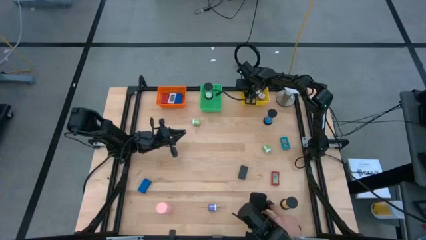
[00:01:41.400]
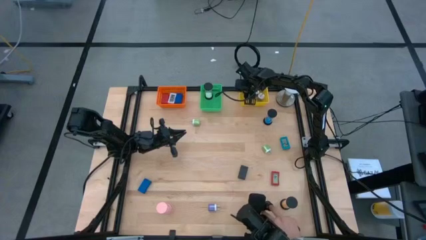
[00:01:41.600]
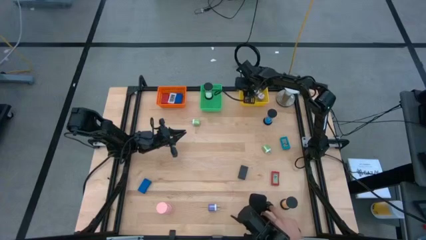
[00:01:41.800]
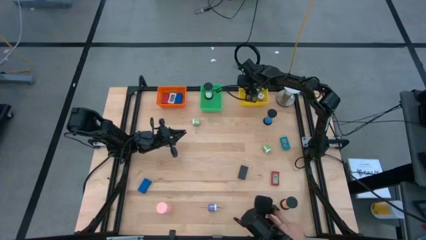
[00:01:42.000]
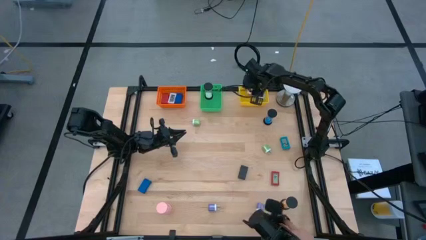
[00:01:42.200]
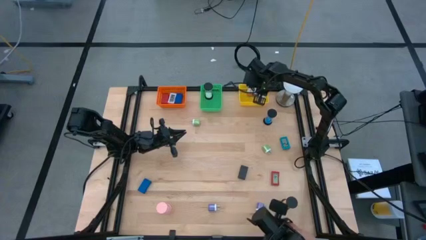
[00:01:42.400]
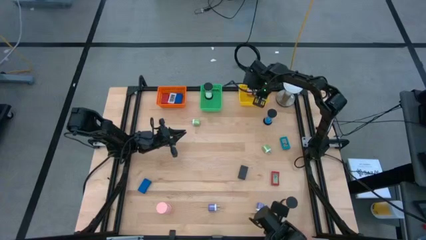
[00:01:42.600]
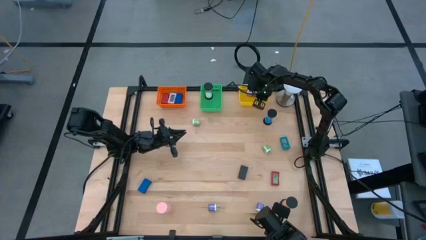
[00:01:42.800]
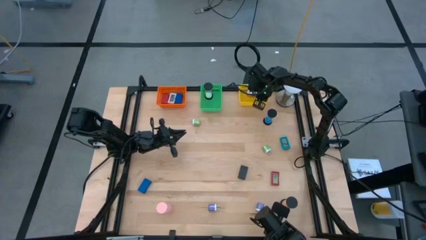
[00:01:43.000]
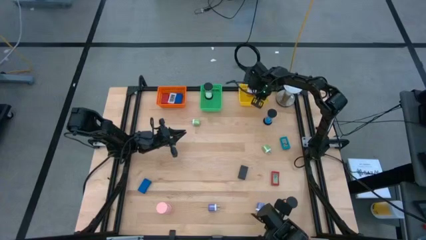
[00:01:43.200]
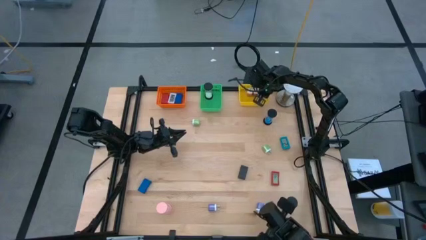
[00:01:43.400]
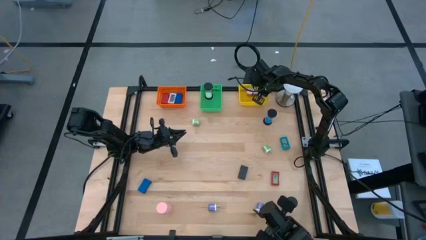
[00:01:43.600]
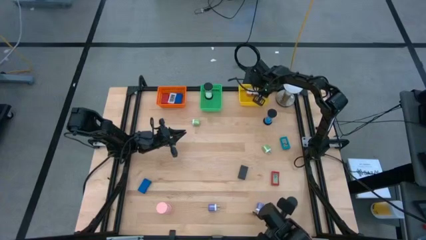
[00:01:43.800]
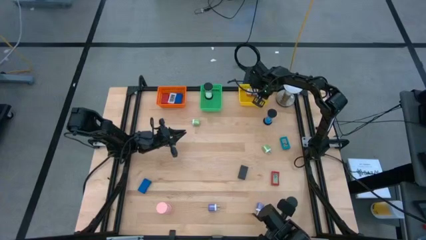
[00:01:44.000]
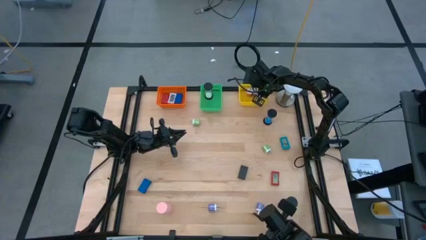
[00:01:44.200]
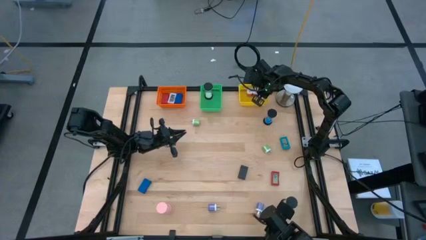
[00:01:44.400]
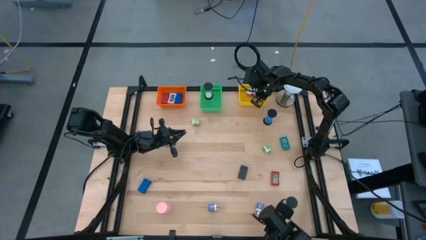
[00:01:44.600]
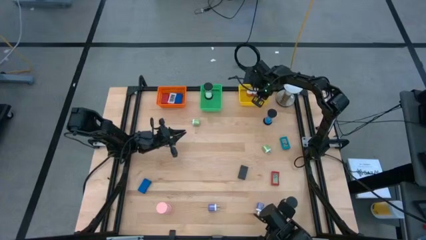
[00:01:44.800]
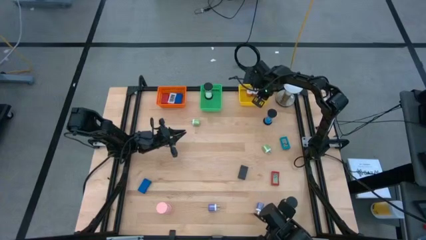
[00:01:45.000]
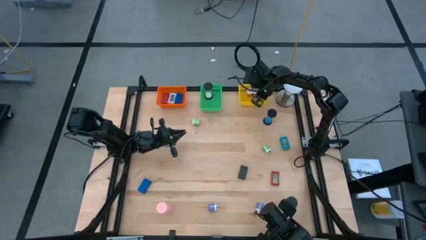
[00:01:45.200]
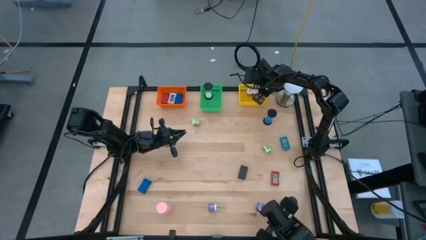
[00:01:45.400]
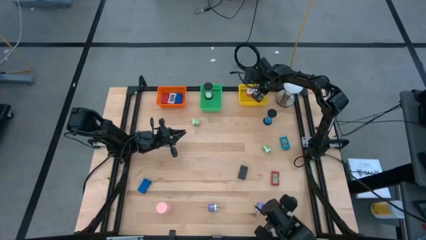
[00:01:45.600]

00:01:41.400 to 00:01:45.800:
Task: Pick & Place Office items
Adjust the blue charger adapter in the yellow bin

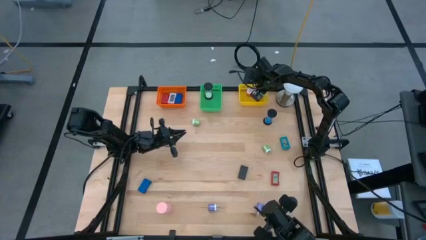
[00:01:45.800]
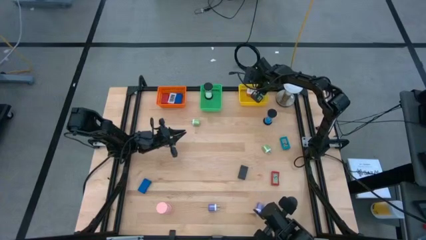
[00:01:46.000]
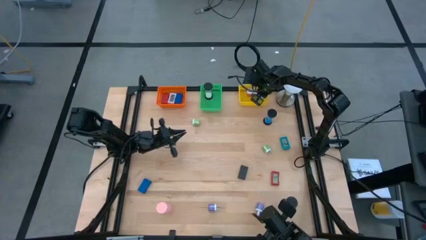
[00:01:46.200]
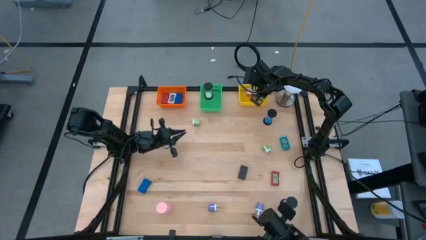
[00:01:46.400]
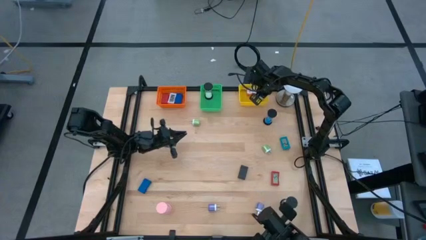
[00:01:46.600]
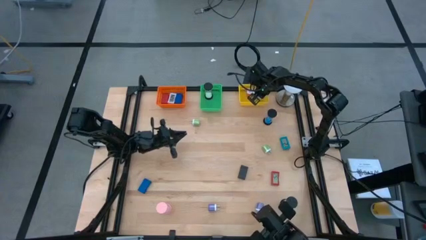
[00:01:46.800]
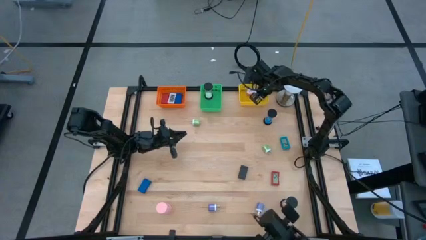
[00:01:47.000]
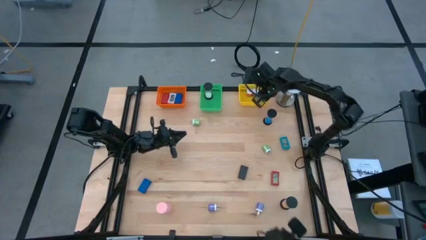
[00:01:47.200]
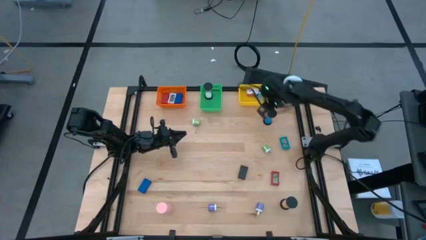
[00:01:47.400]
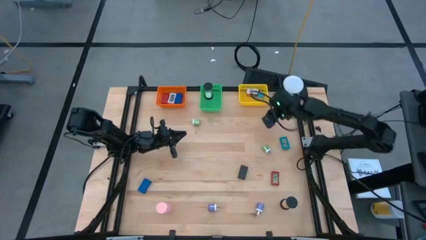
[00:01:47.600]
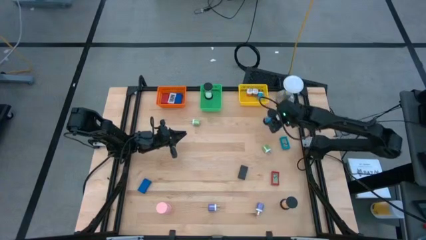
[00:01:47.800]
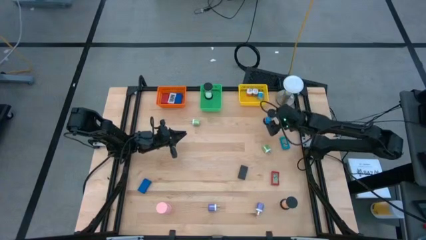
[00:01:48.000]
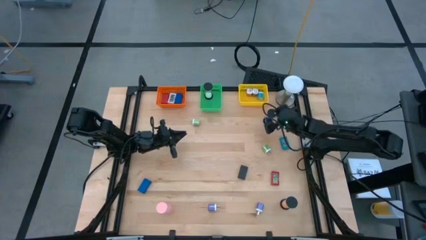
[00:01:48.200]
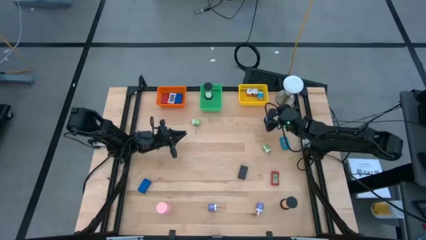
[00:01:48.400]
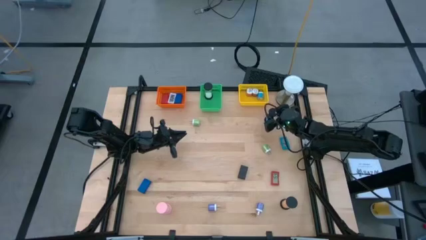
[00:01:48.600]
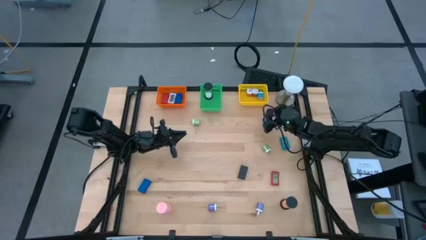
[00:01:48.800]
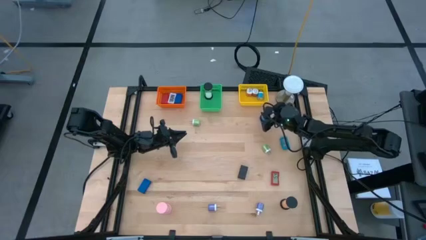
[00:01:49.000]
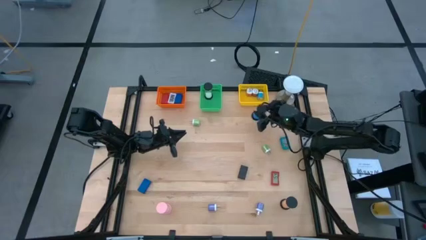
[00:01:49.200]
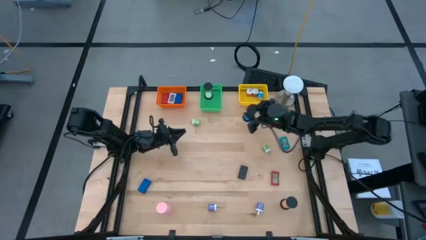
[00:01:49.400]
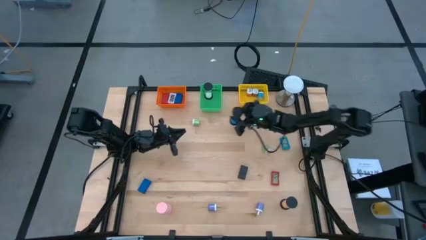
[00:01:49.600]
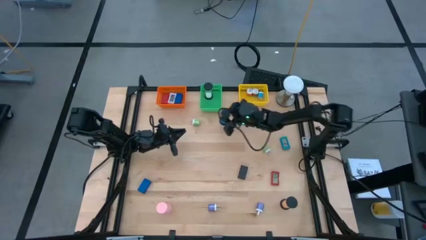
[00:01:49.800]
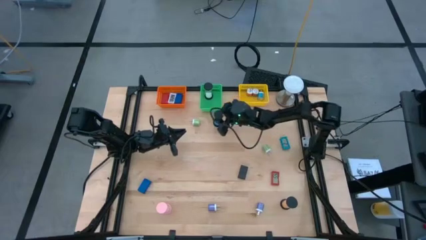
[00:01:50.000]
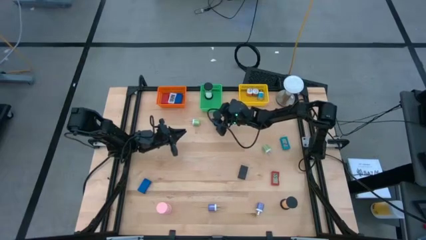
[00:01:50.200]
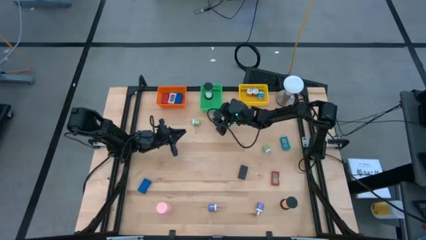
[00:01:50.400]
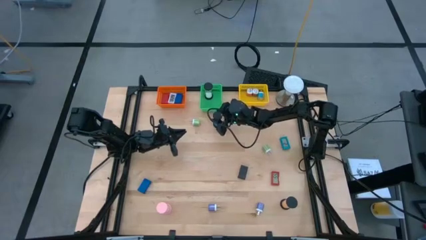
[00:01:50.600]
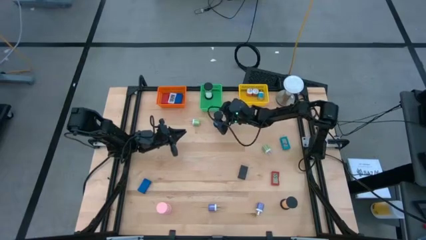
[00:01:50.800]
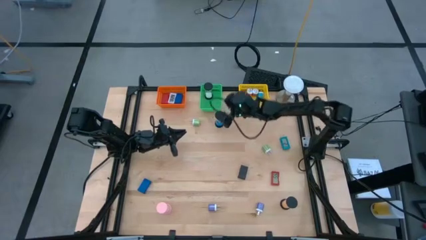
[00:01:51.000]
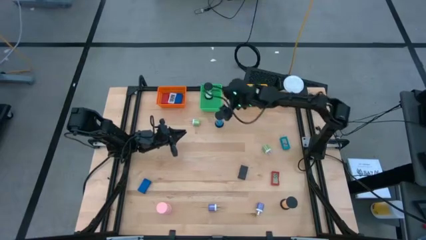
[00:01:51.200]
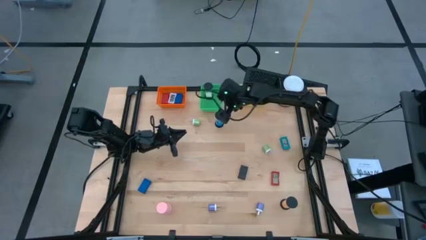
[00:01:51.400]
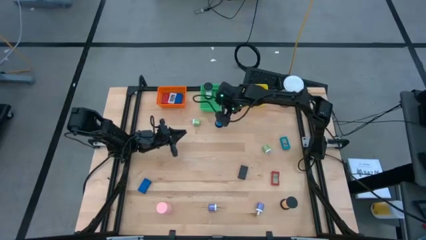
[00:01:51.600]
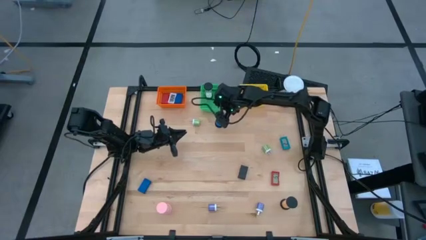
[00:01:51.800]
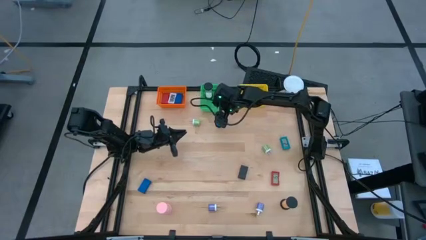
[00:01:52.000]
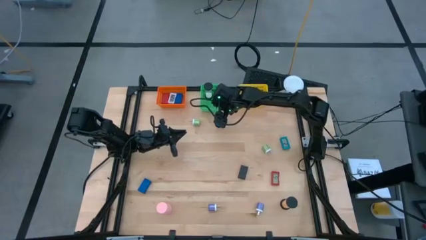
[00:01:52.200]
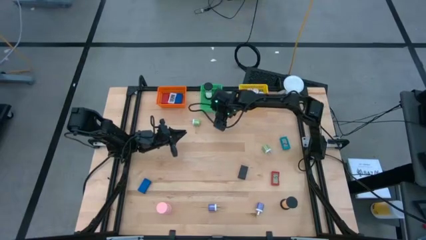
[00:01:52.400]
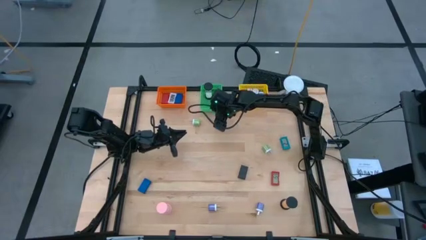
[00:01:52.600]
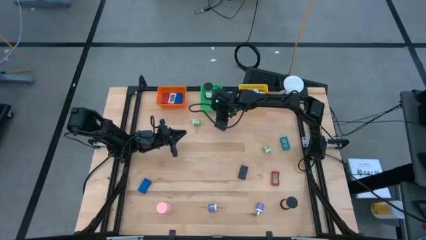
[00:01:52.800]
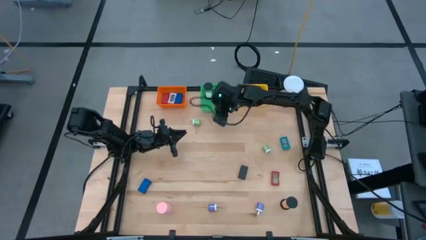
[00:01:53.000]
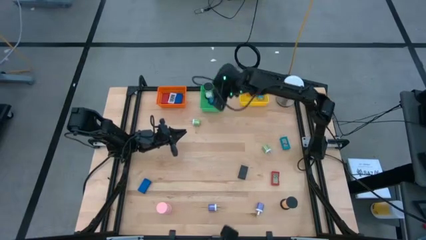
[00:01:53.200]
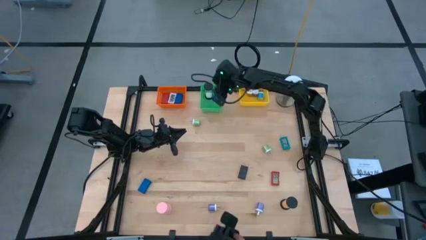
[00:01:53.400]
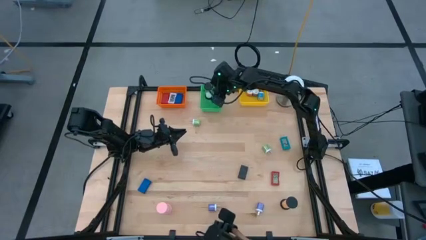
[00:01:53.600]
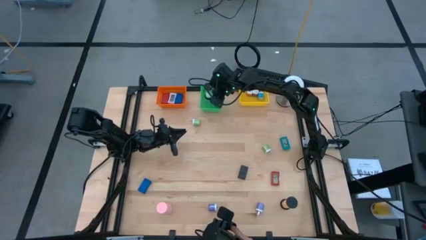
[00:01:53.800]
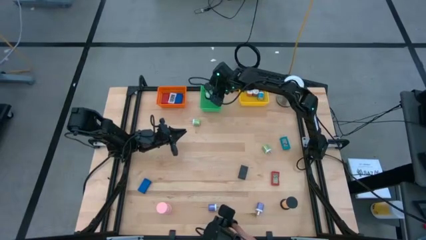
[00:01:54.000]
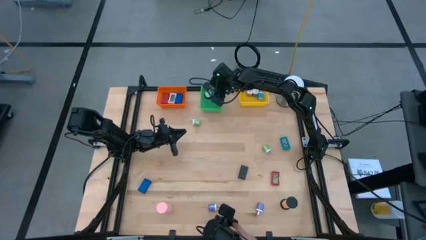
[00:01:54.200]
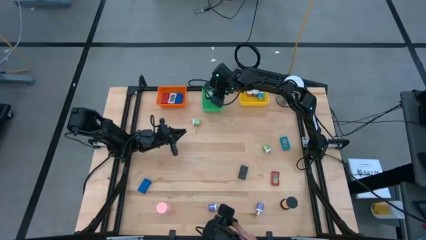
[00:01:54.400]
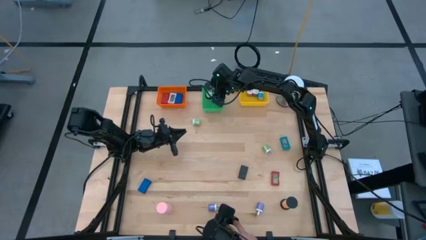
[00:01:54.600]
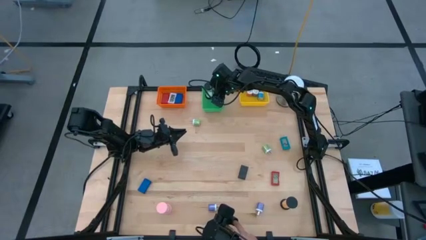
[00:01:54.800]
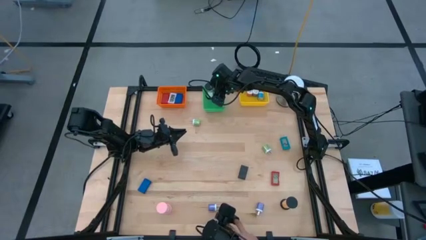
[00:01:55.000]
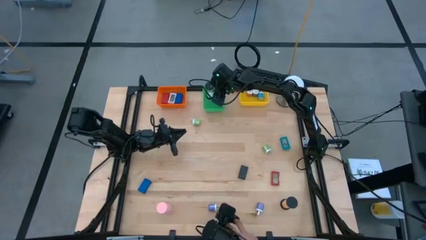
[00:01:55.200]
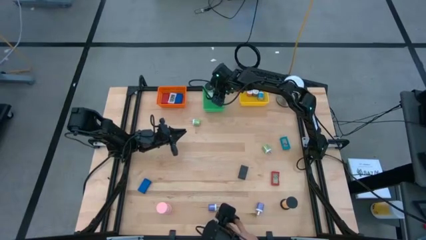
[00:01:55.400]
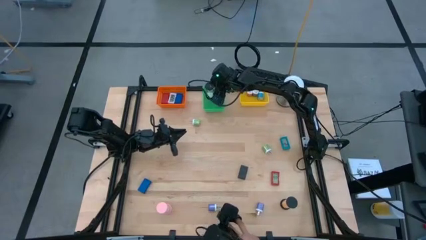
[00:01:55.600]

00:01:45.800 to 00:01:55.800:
Put the blue hourglass into the green bin
